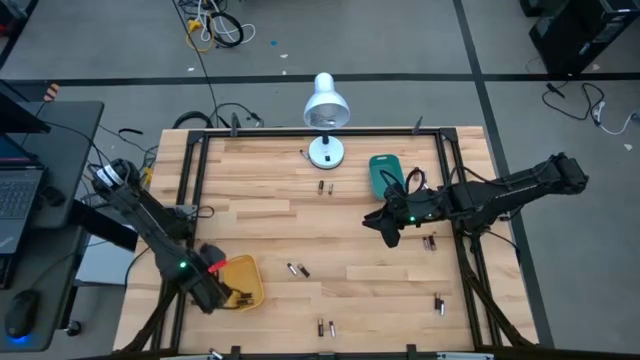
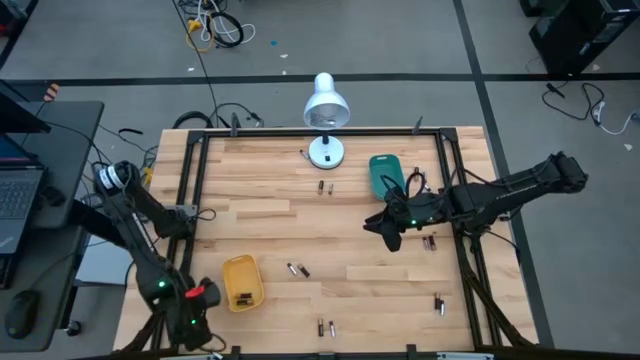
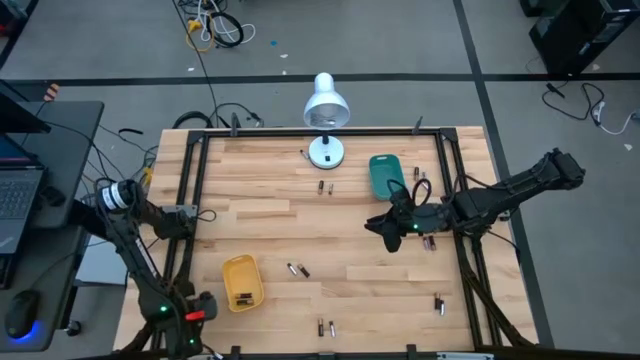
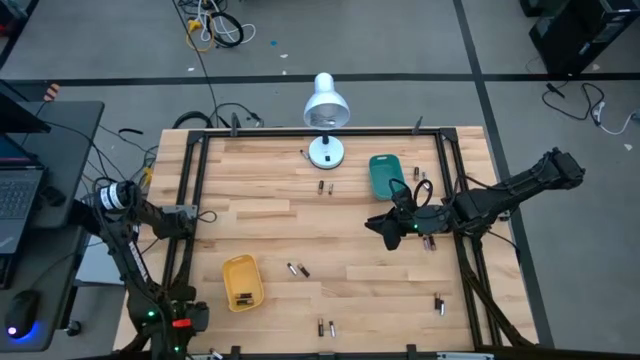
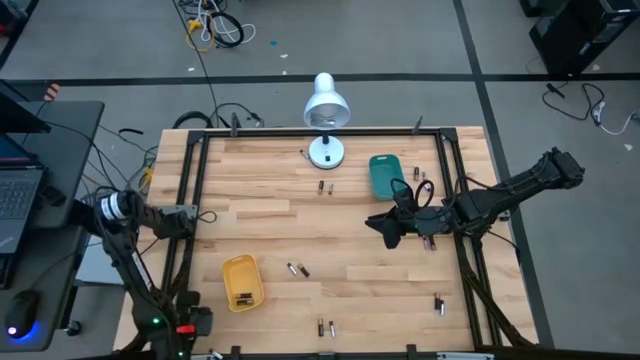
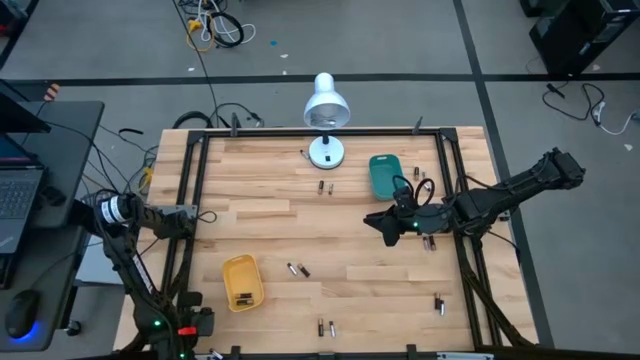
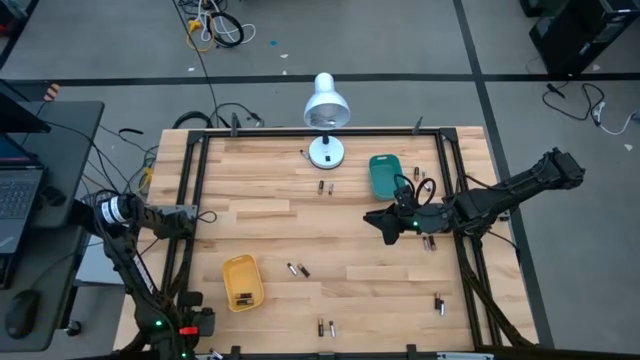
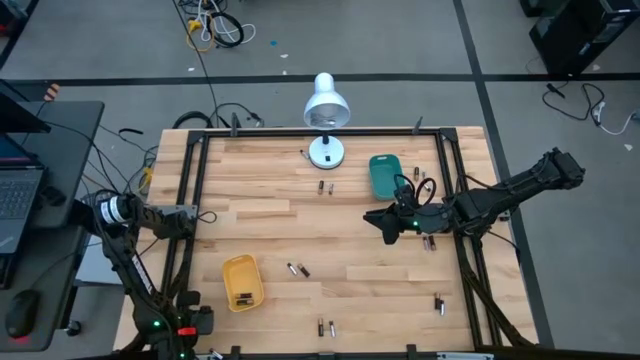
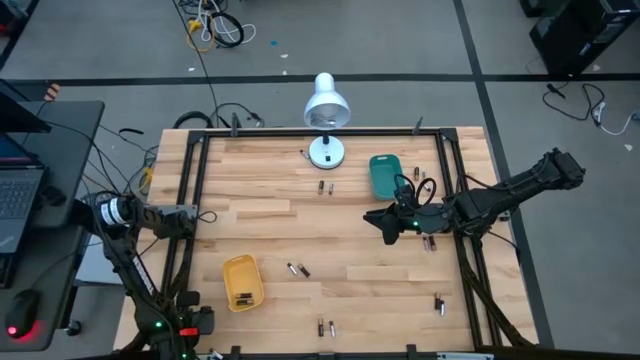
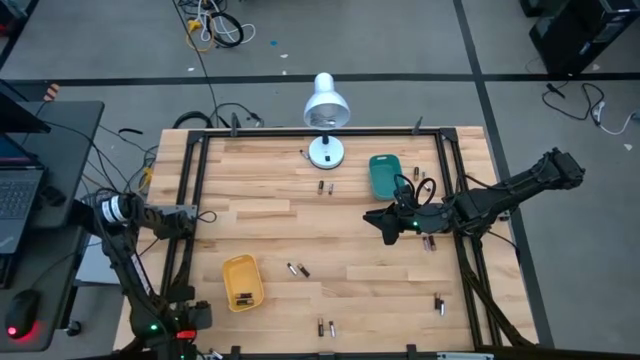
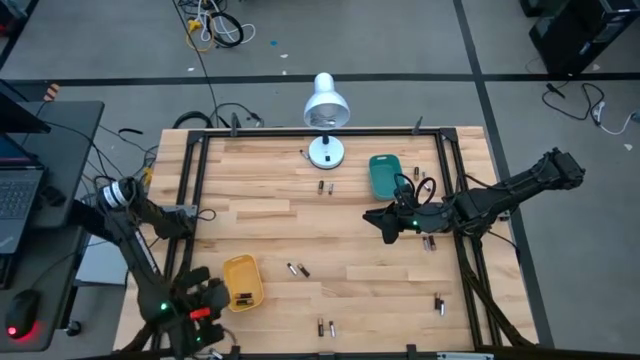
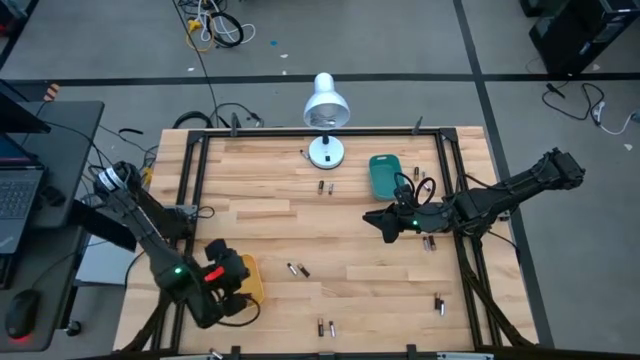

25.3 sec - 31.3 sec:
Task: Sort batteries
Put the golden battery into the yellow bin

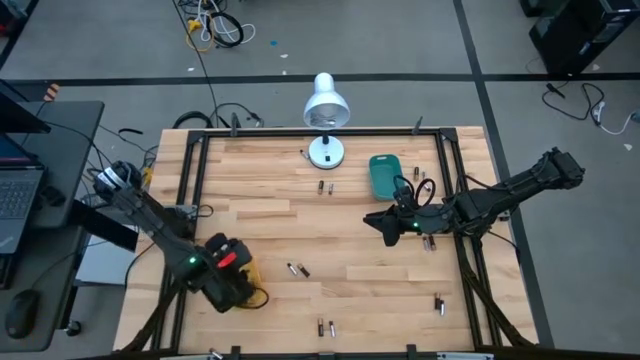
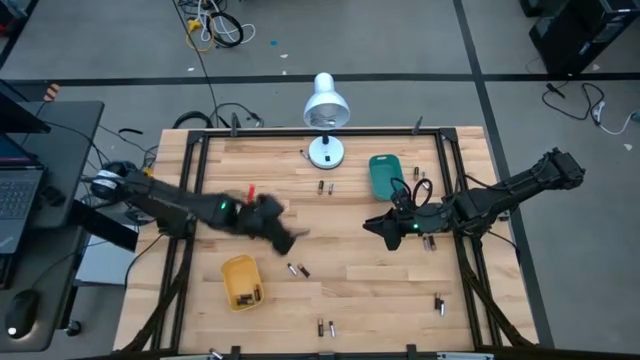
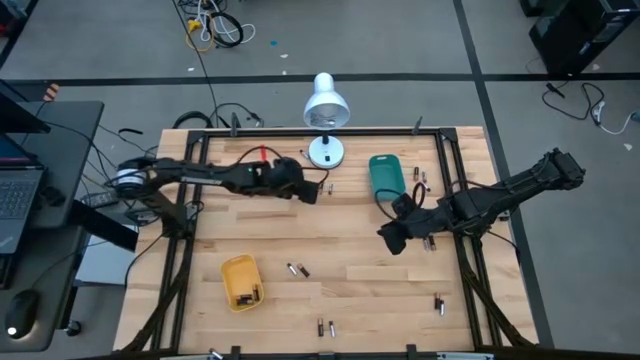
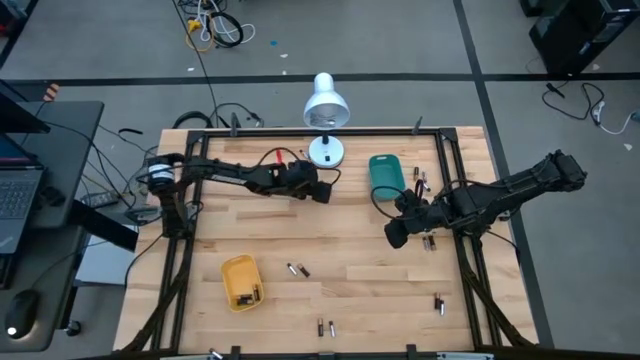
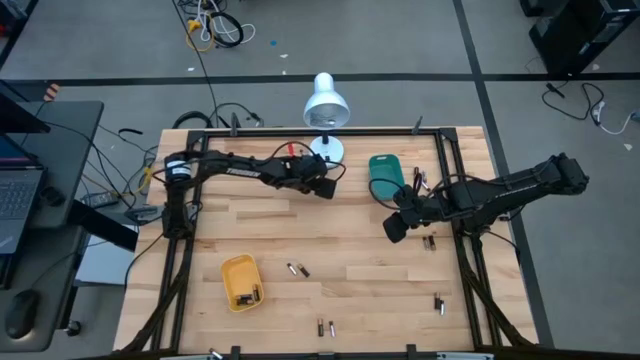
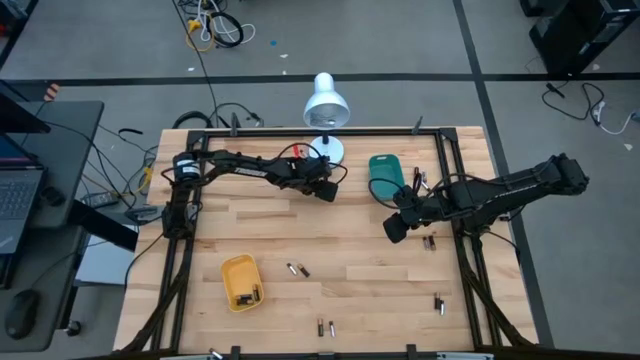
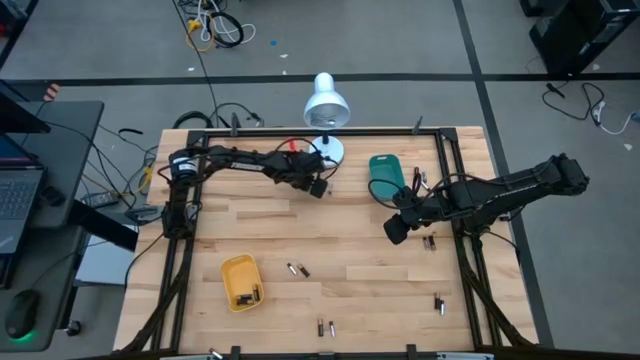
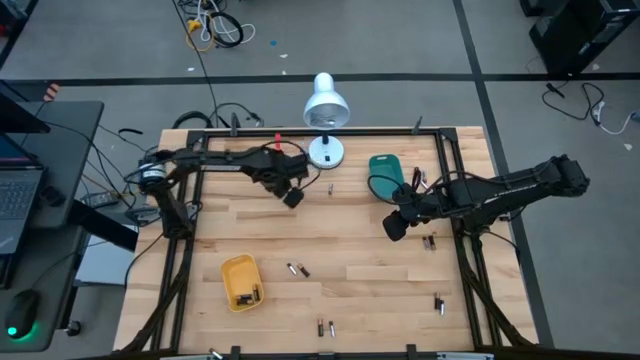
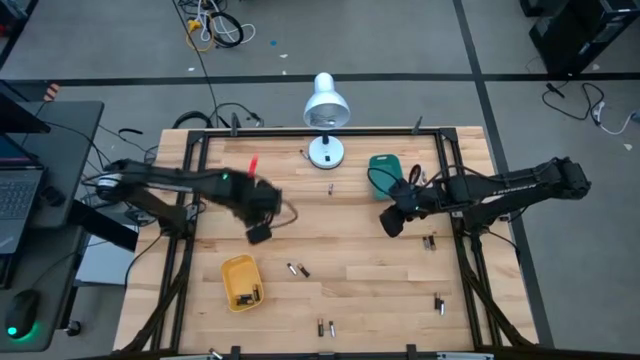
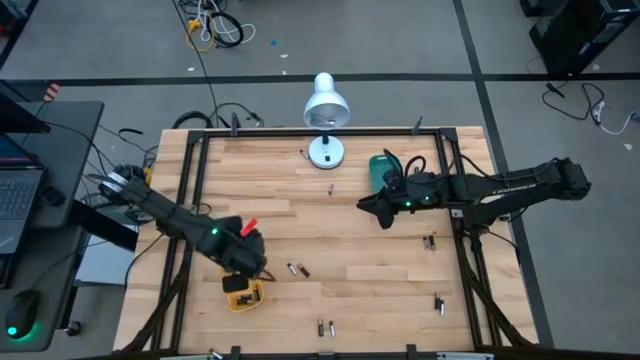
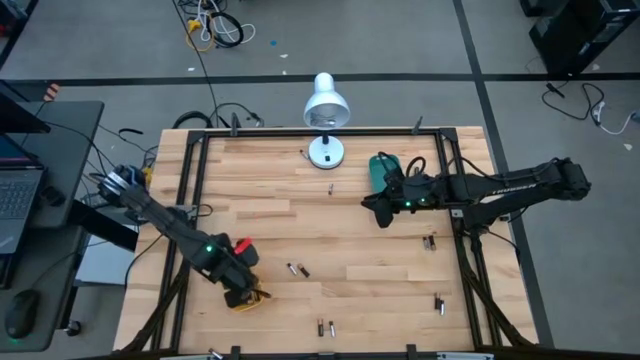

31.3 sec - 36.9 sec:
Put the golden battery into the yellow bin

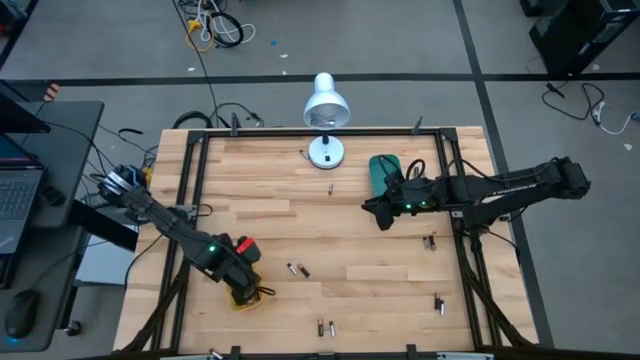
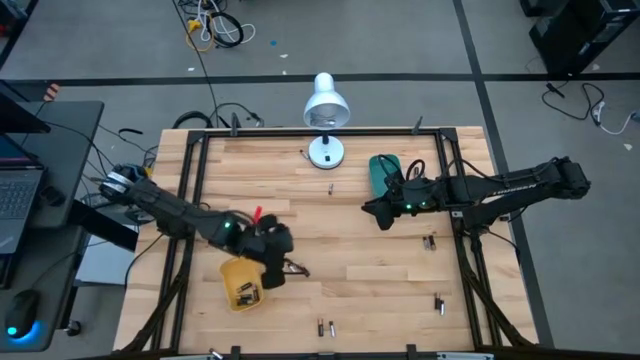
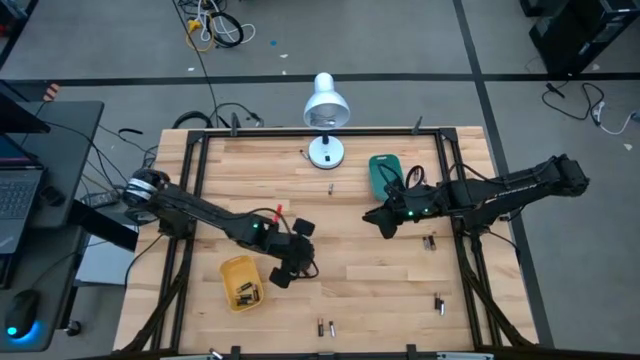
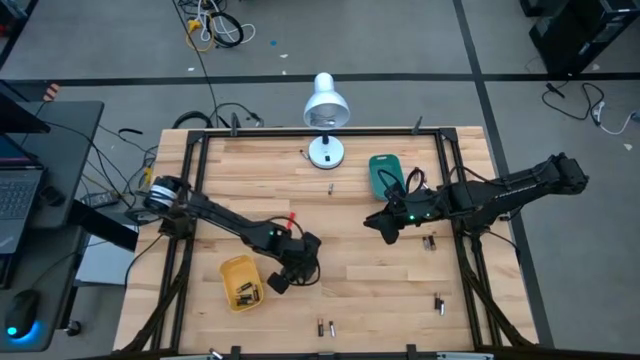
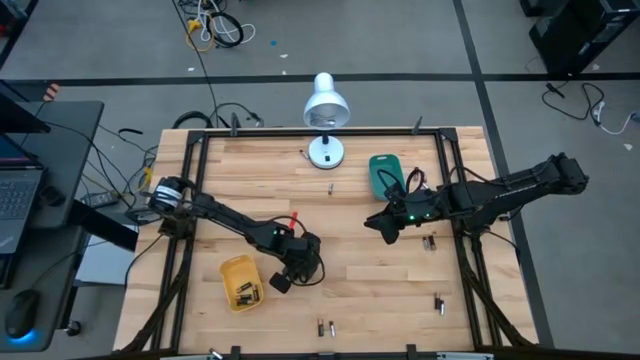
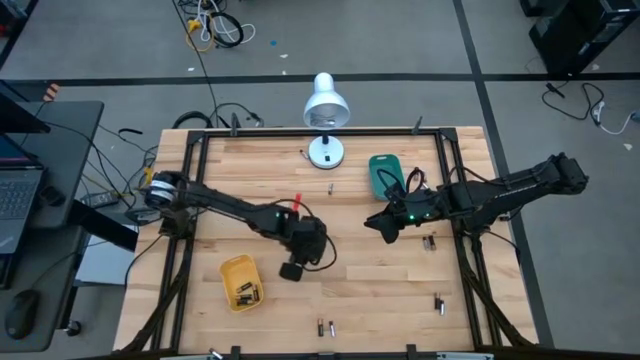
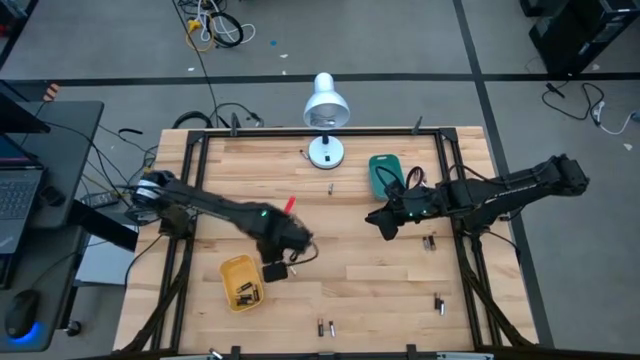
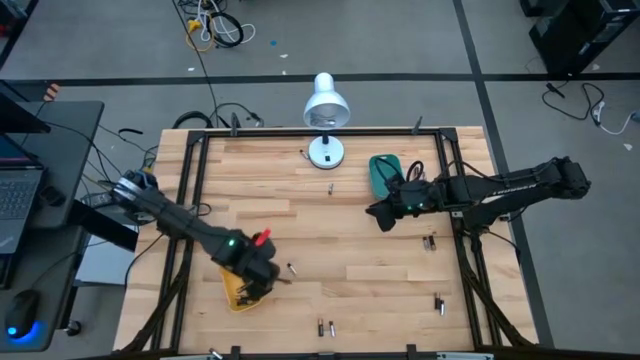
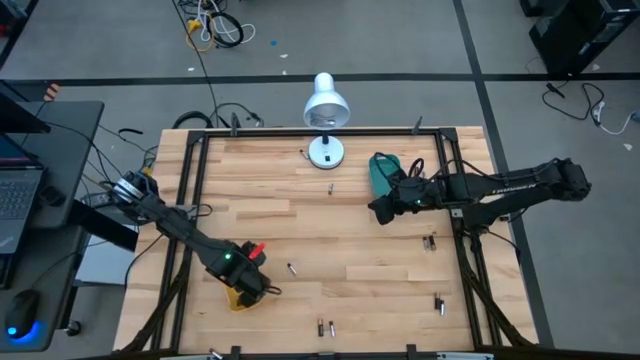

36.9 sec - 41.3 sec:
Put the golden battery into the yellow bin

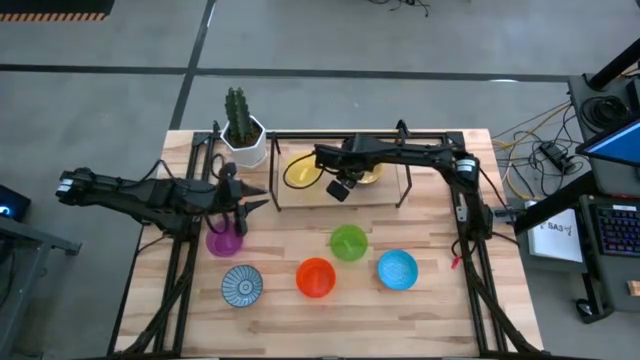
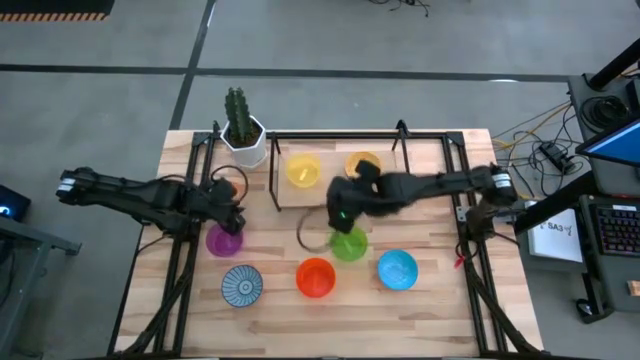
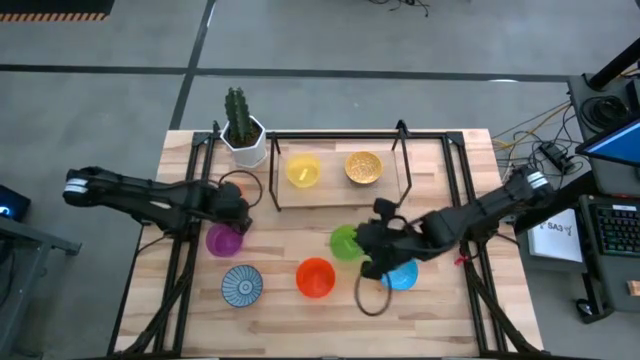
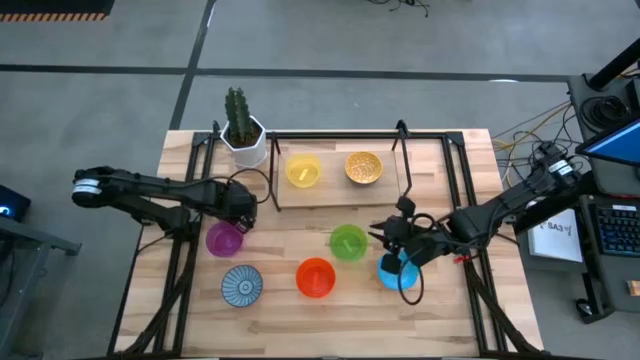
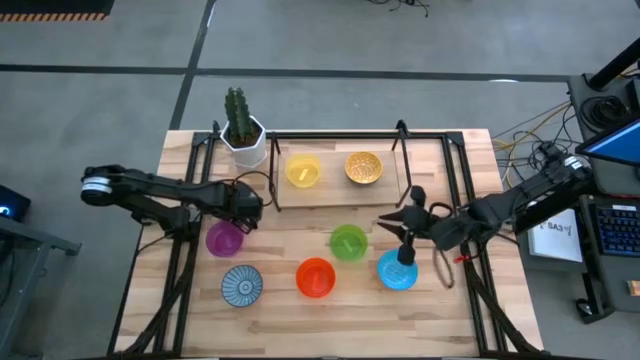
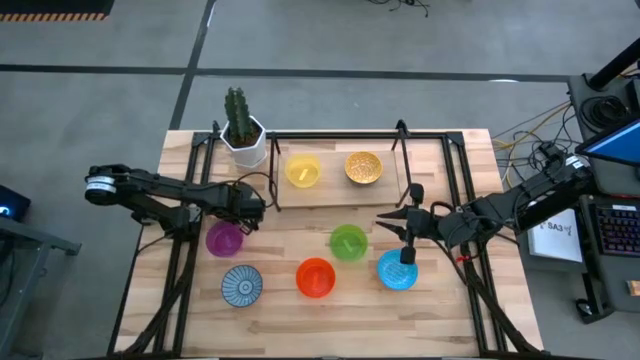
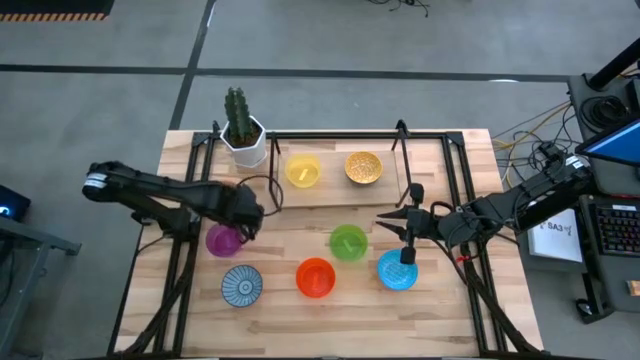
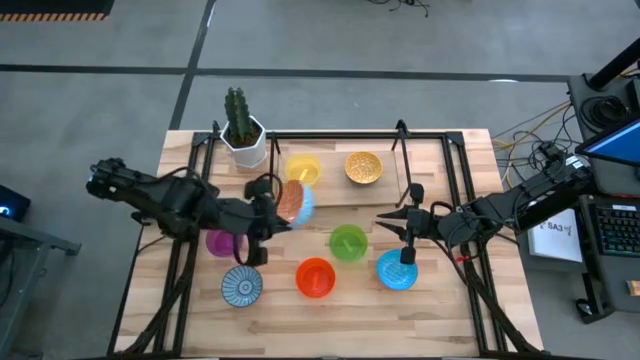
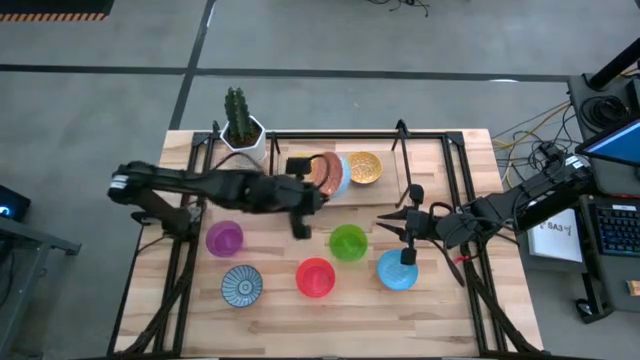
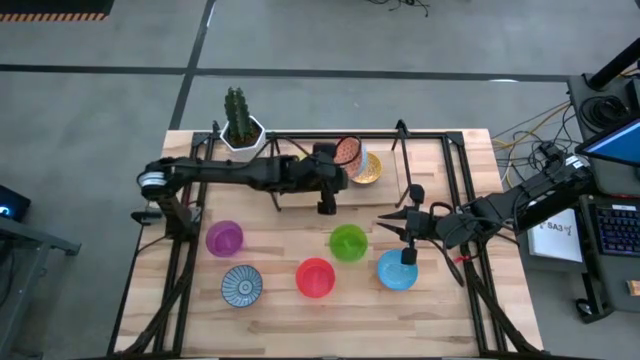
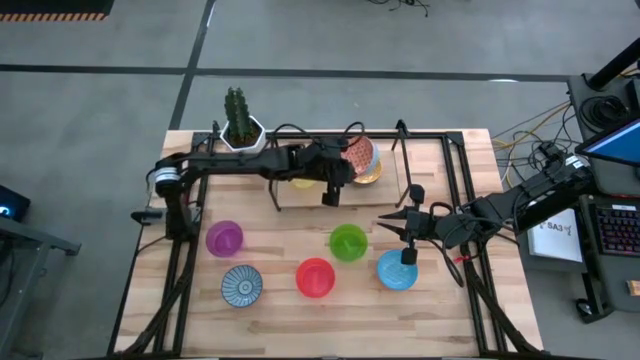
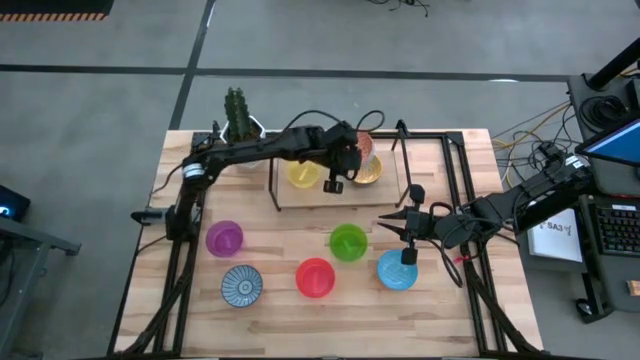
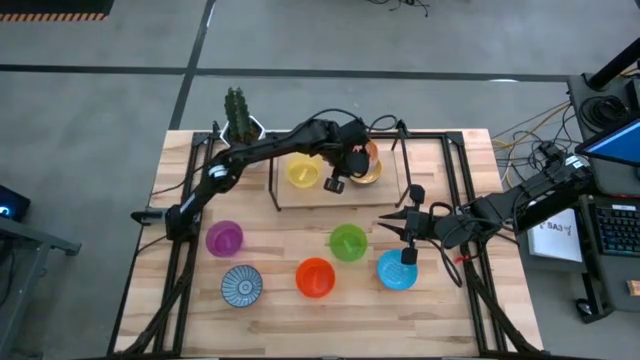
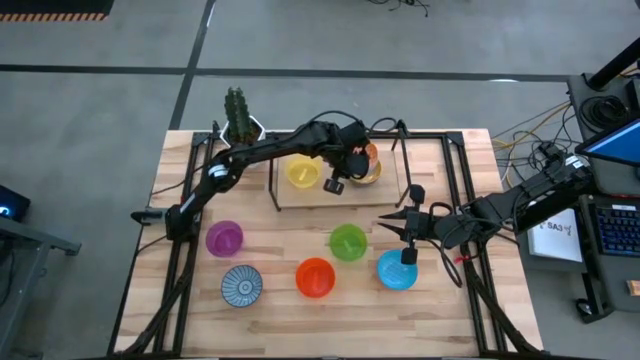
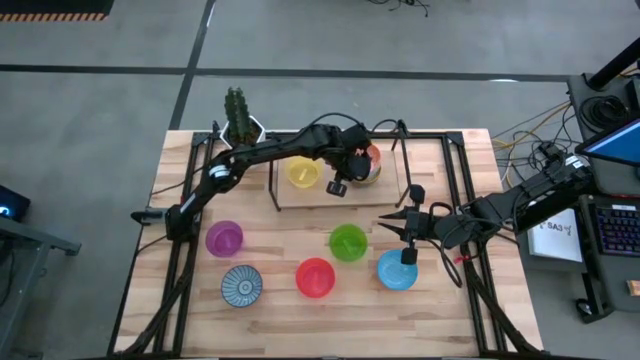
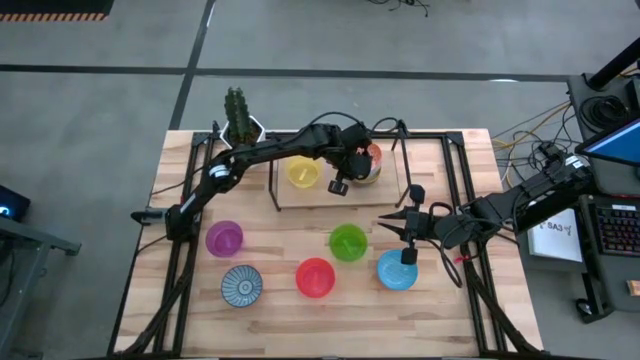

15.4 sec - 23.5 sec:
Task: Place and stack bowls onto a shelf
Stack the orange pattern bowl on the yellow pattern bowl
